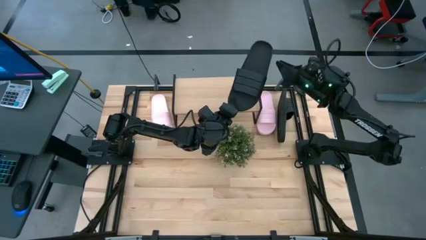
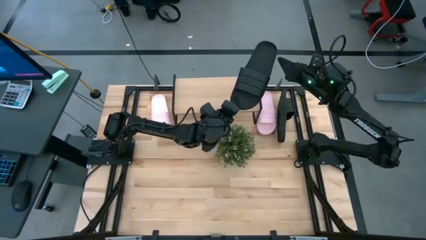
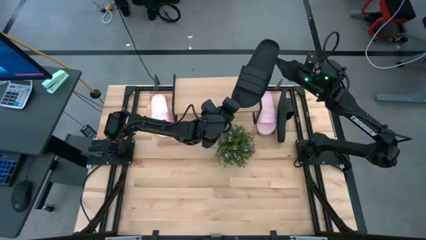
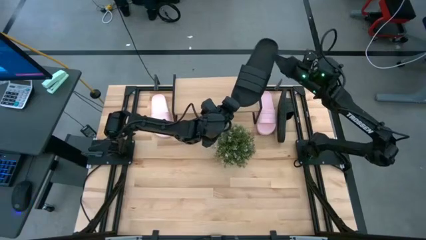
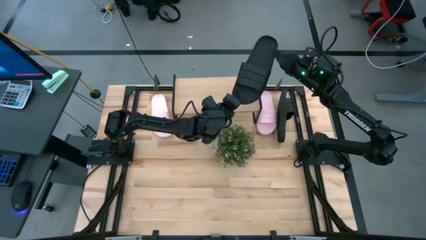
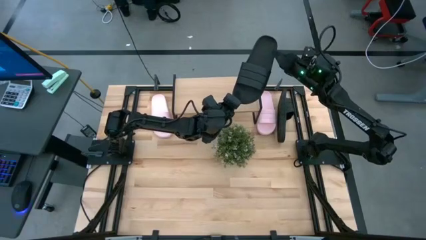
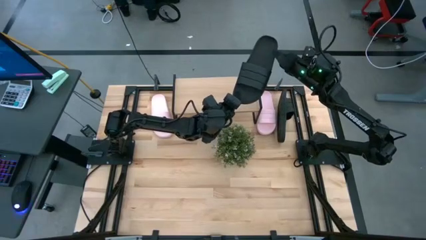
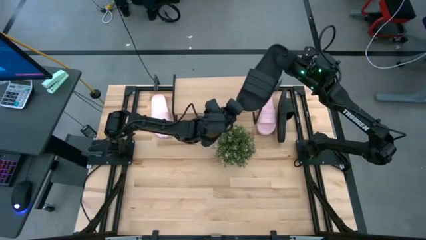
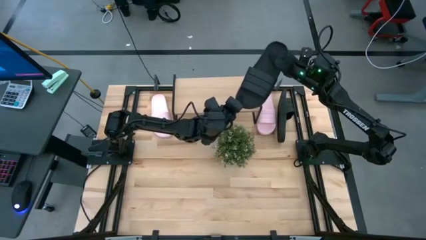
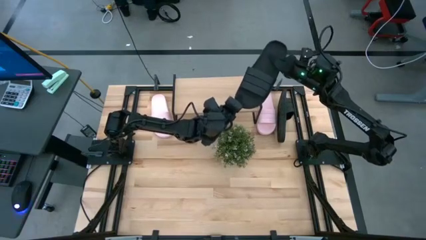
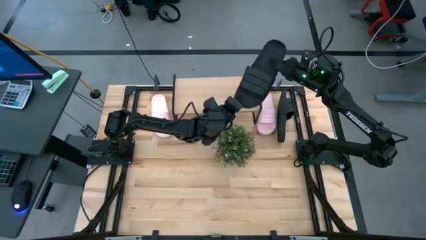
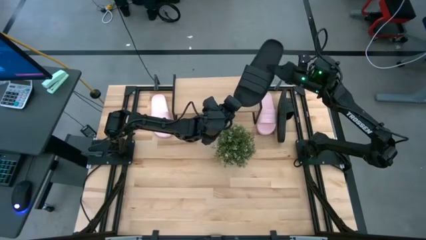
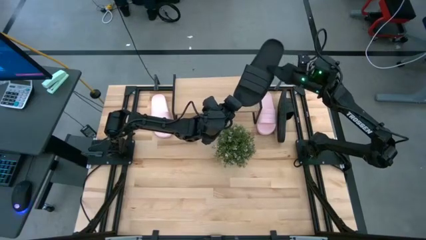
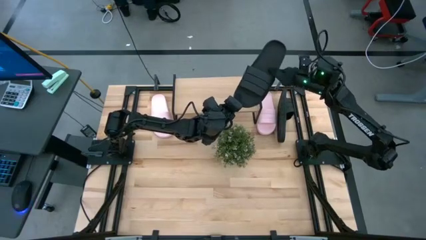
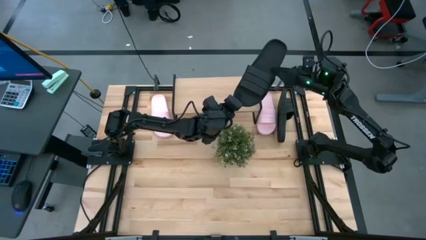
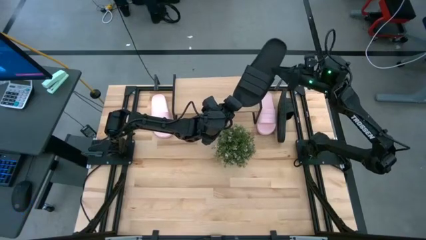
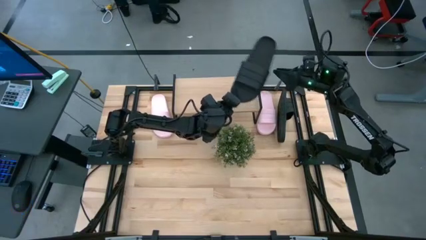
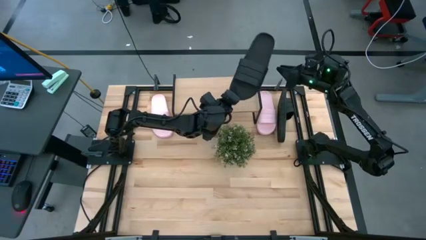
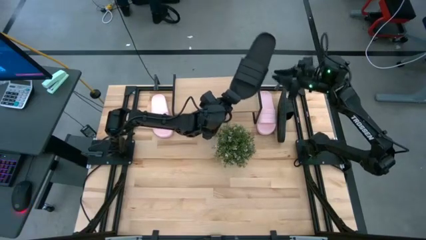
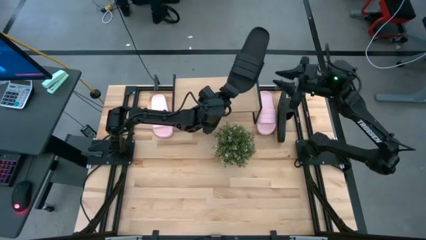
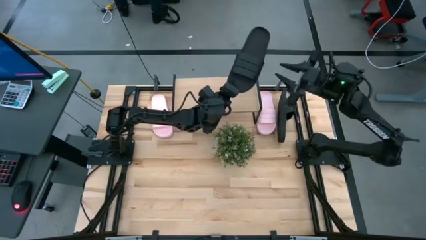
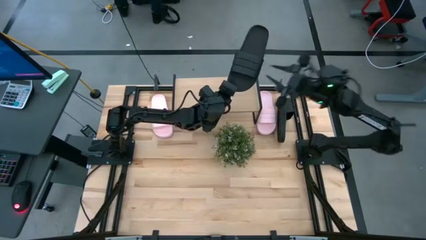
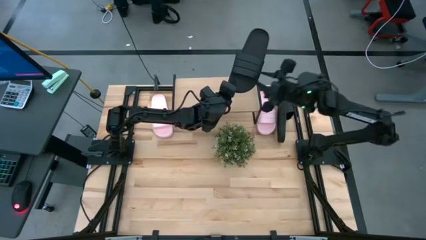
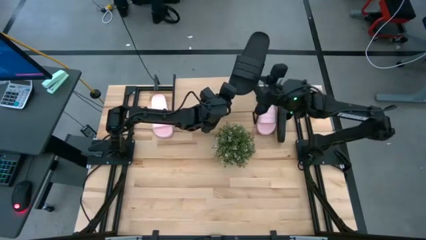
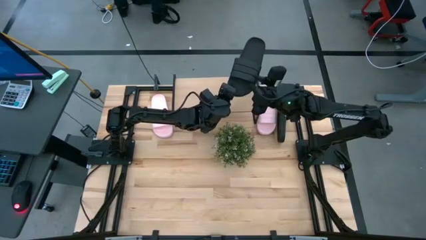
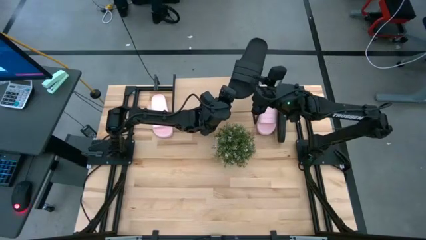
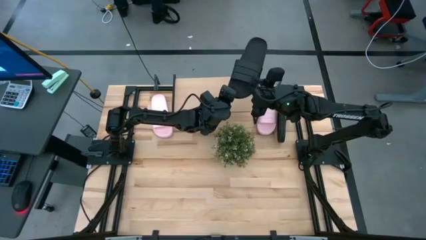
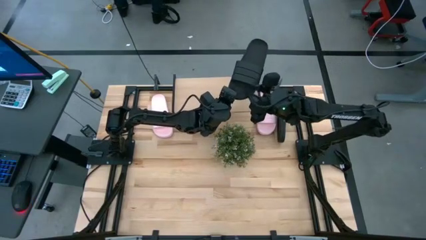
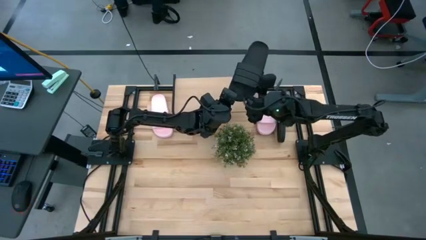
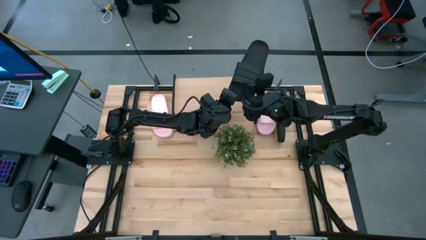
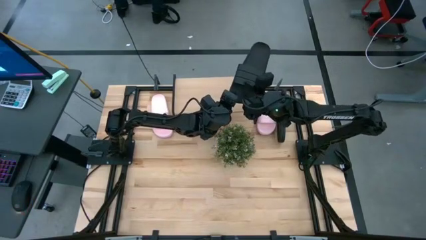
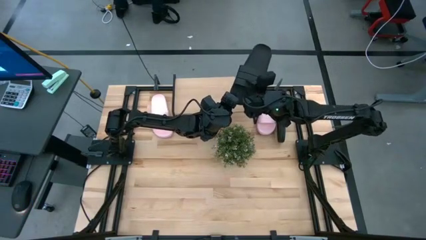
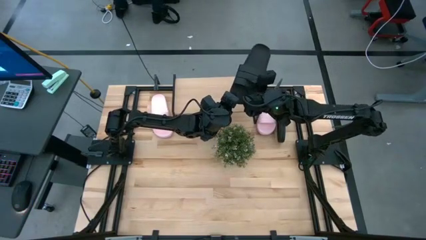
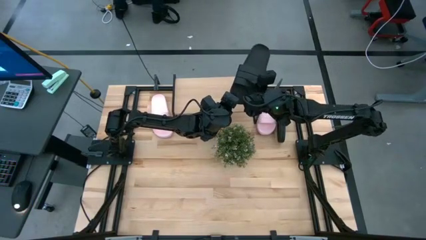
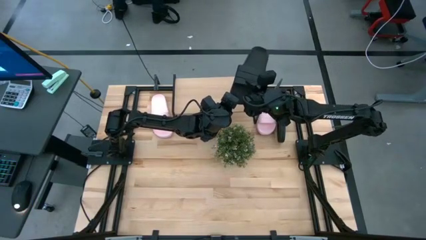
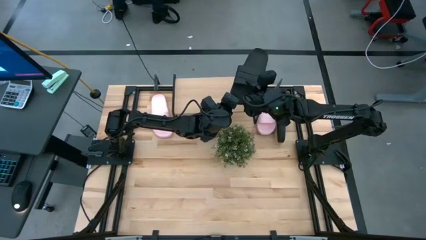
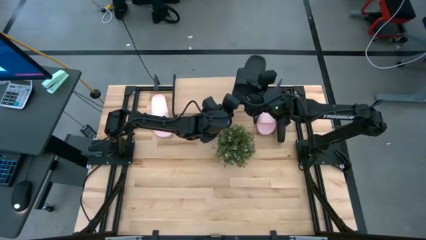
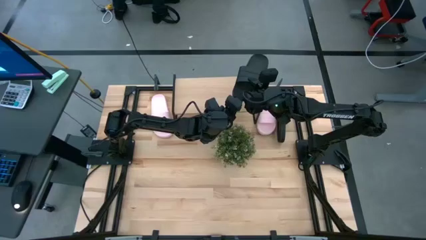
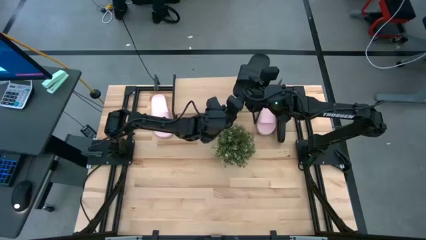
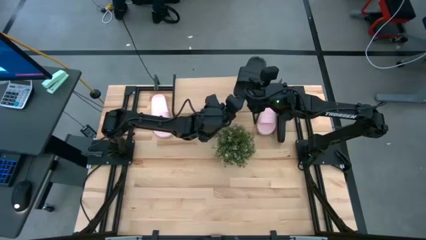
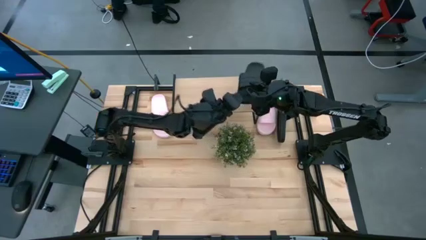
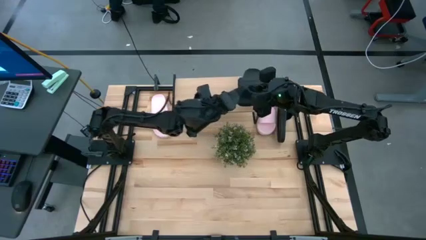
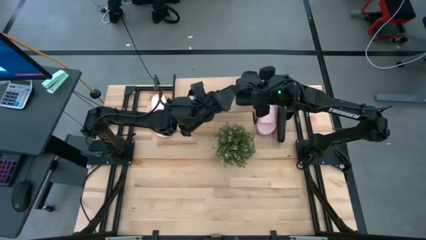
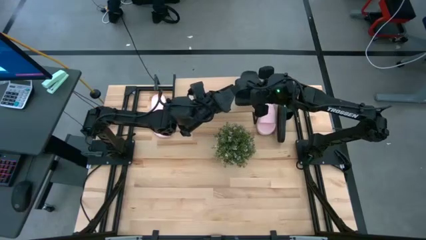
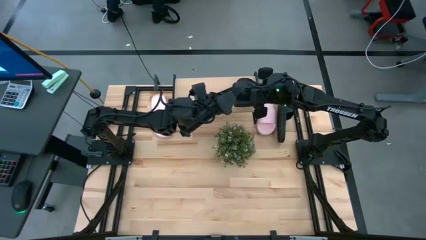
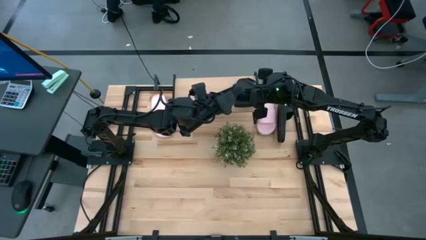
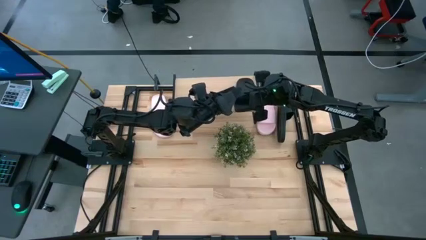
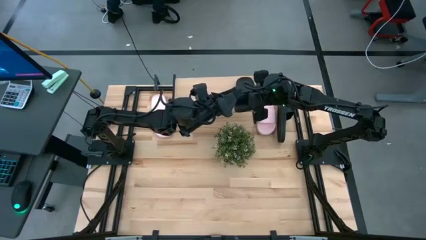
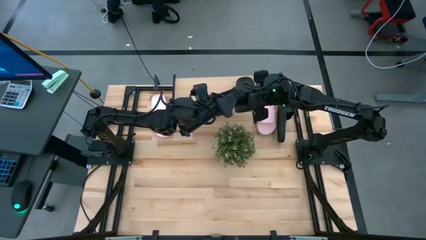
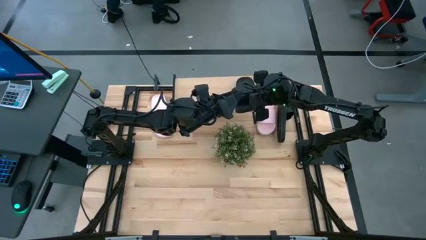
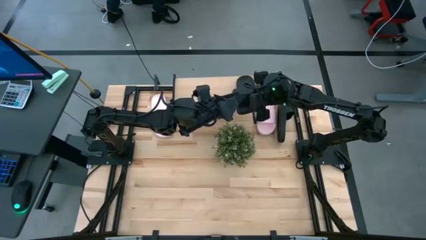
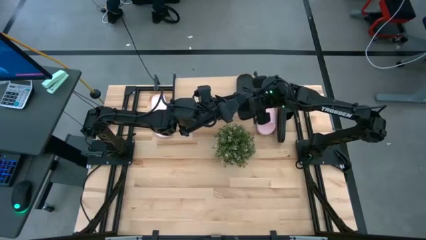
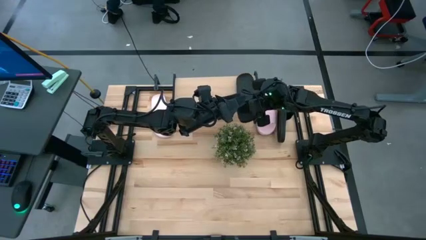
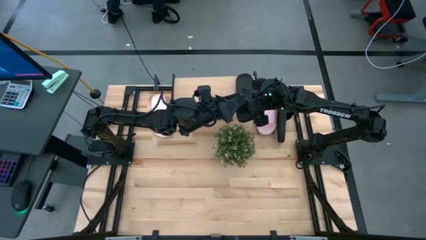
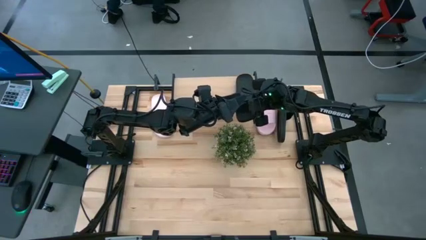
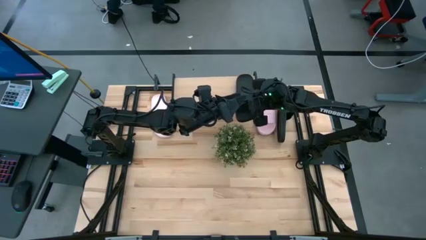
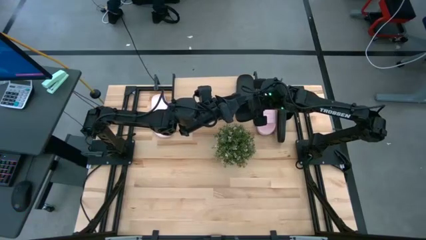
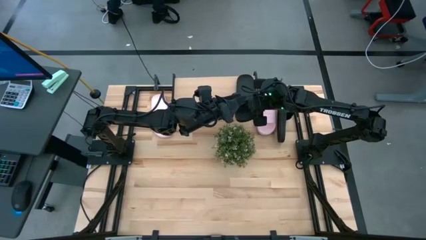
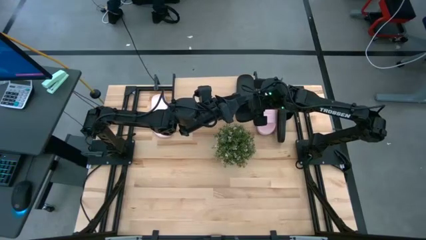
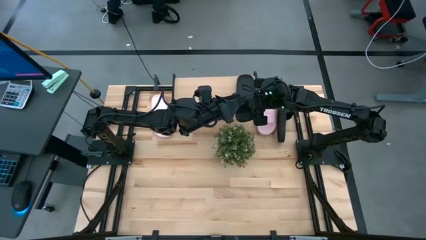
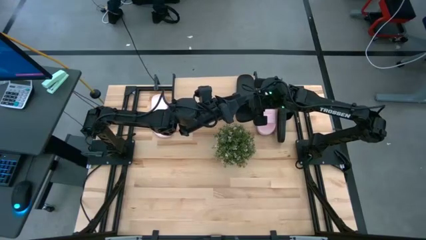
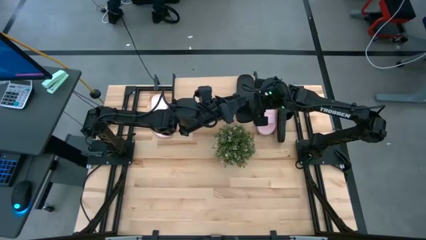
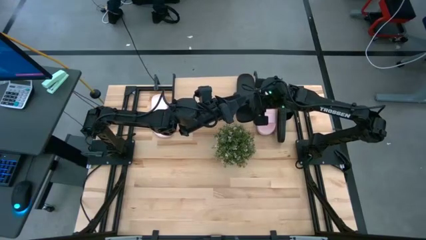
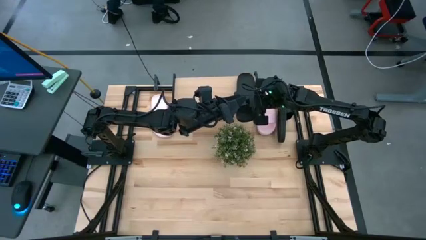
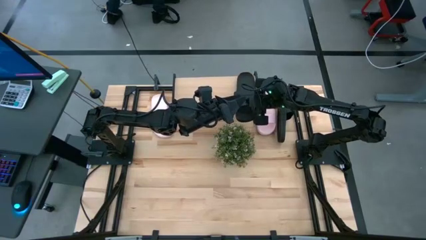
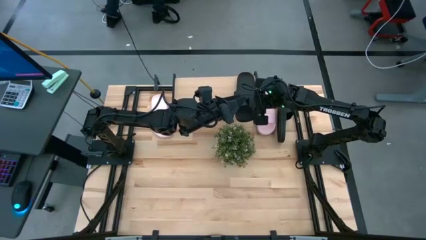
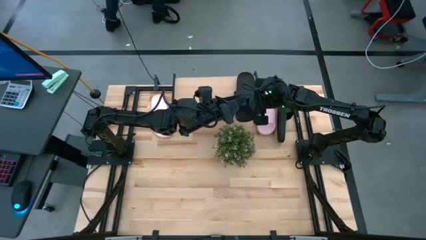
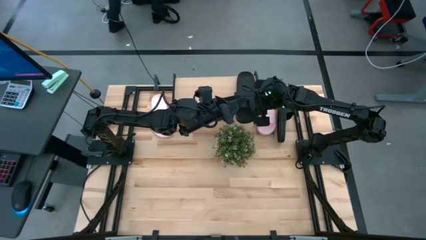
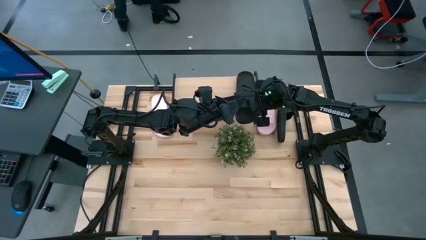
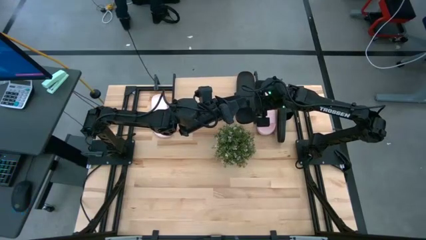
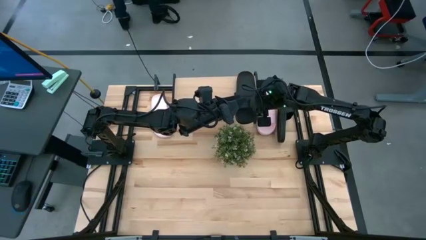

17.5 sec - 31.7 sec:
Task: Pick and place slides into the shelf
Put the left black slipper on the shelf
